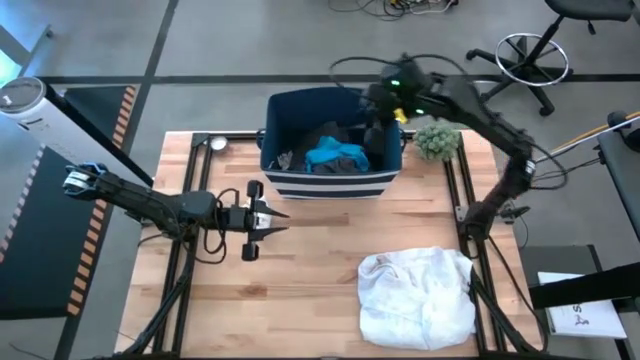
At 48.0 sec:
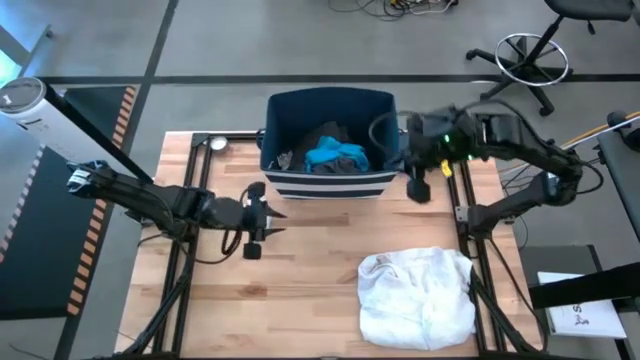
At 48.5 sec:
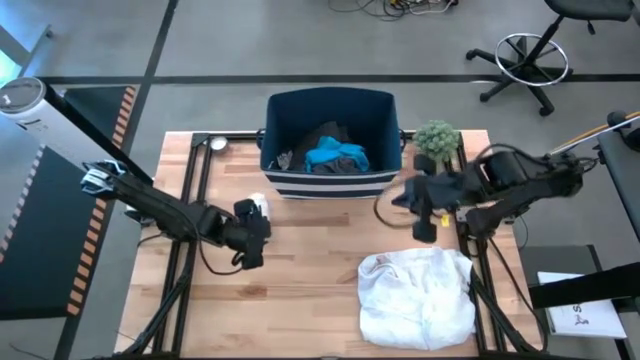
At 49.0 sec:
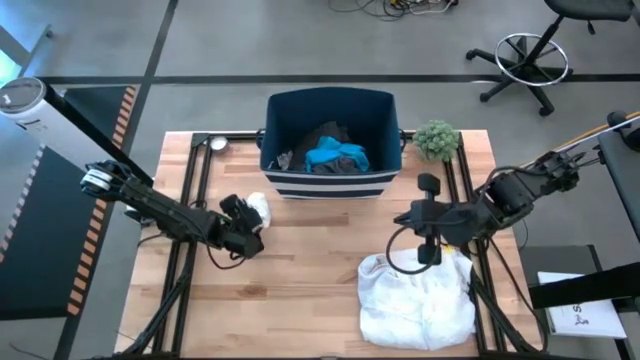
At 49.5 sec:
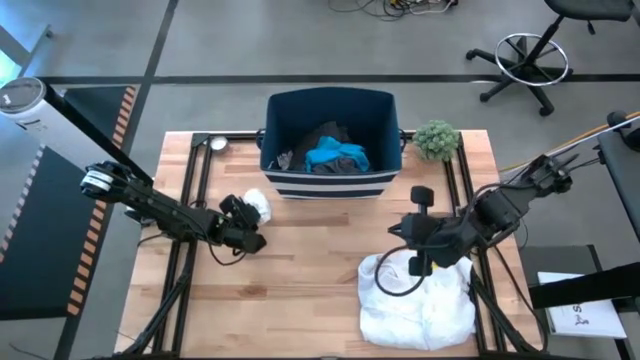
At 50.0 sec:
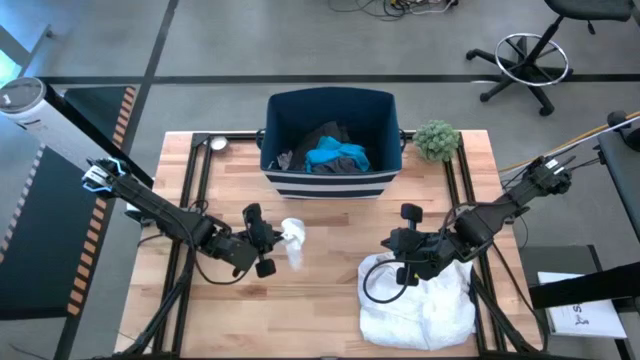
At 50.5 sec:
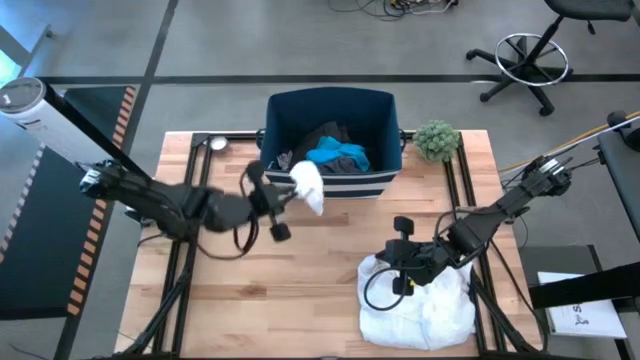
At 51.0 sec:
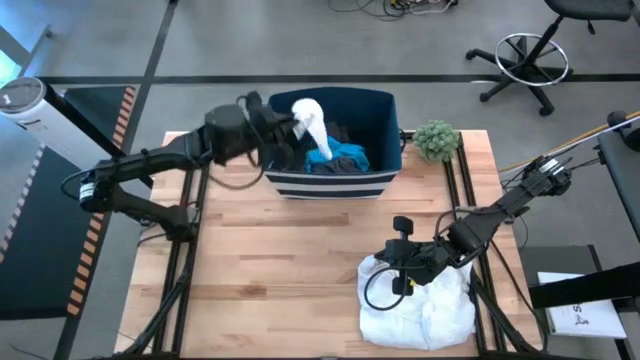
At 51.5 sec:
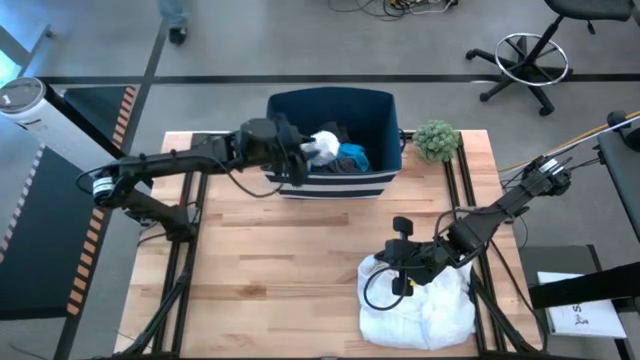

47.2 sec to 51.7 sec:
Task: Sort clothes
Put the white socks into the laundry organizer

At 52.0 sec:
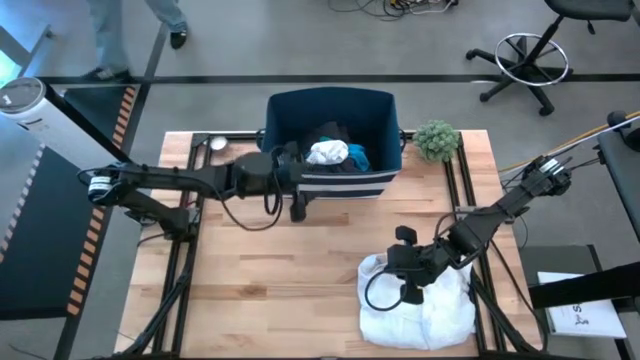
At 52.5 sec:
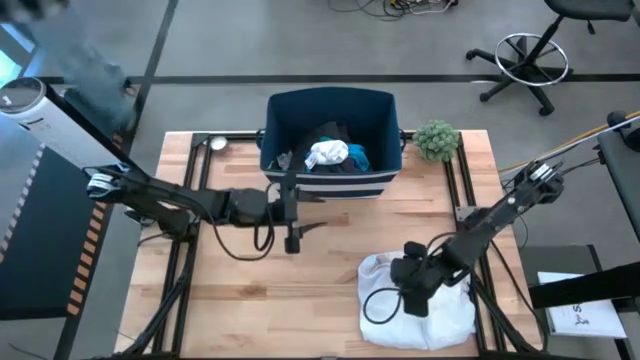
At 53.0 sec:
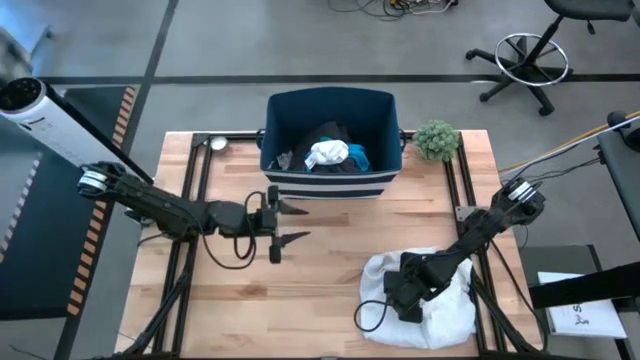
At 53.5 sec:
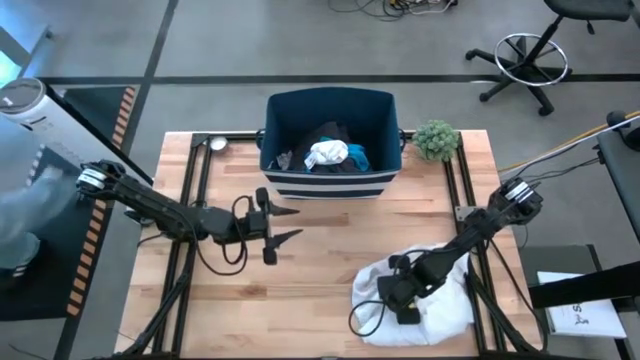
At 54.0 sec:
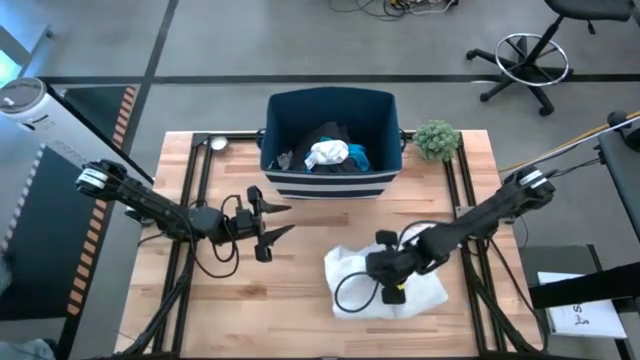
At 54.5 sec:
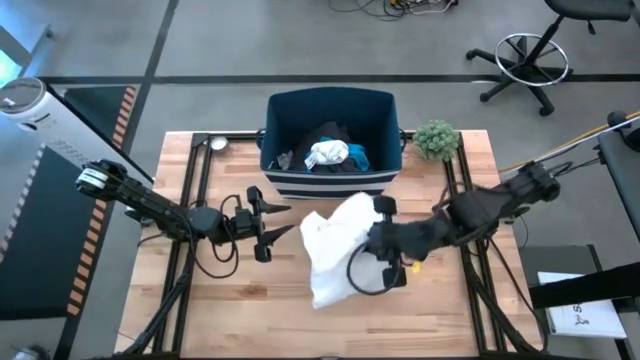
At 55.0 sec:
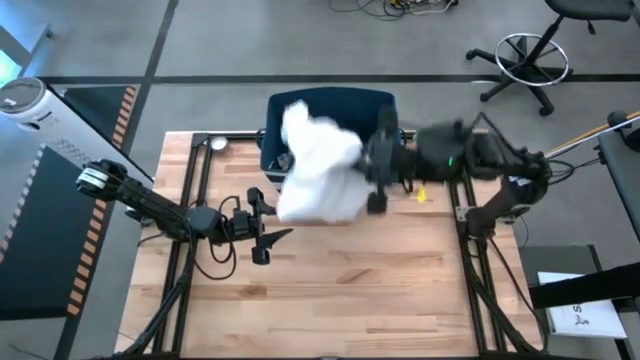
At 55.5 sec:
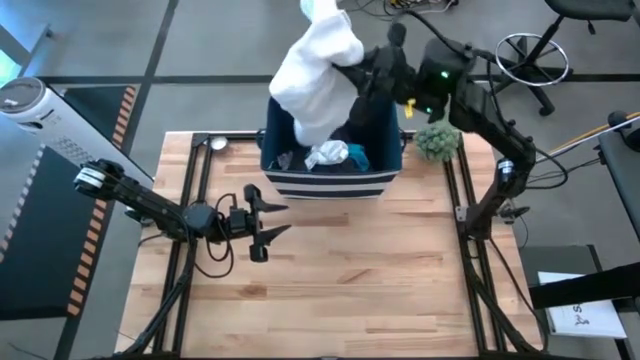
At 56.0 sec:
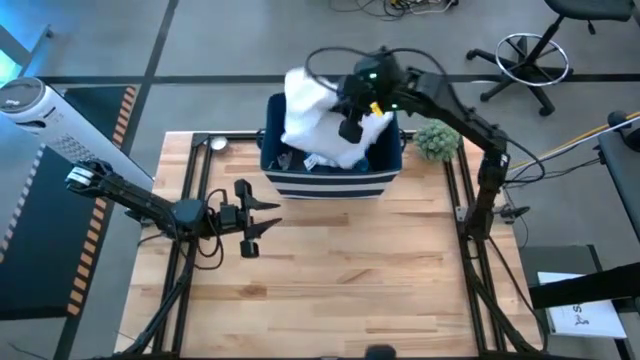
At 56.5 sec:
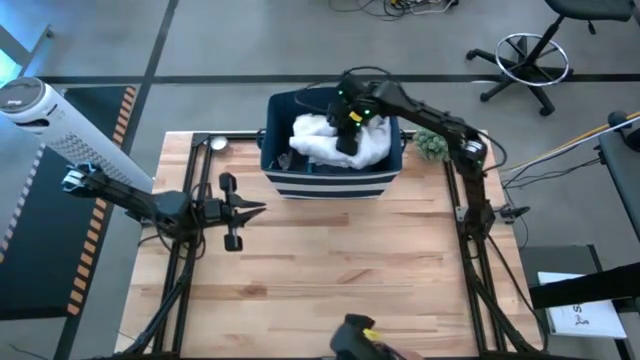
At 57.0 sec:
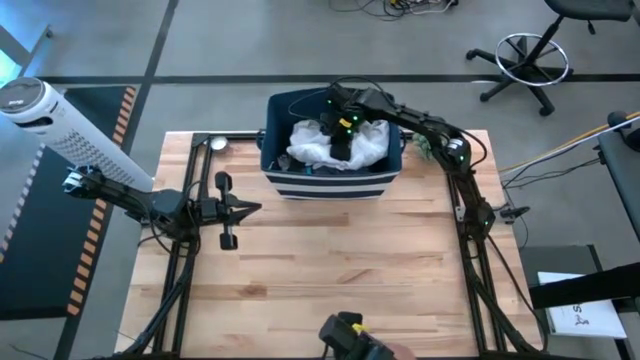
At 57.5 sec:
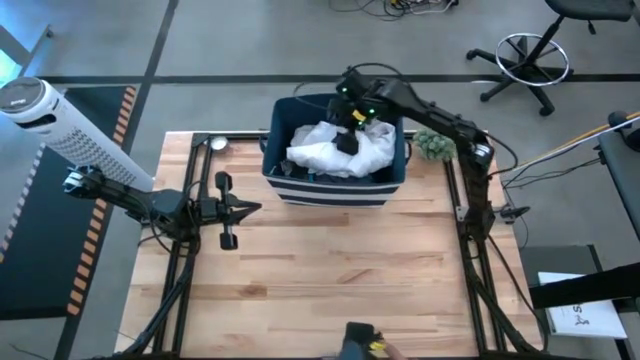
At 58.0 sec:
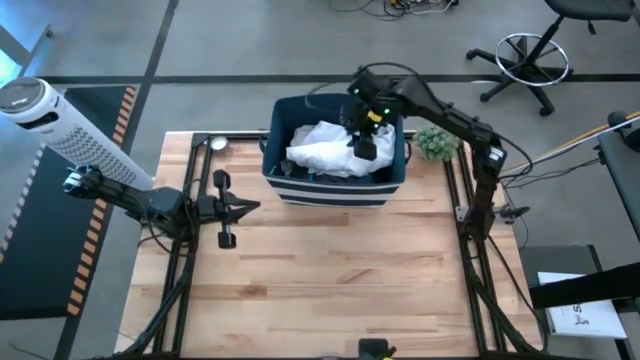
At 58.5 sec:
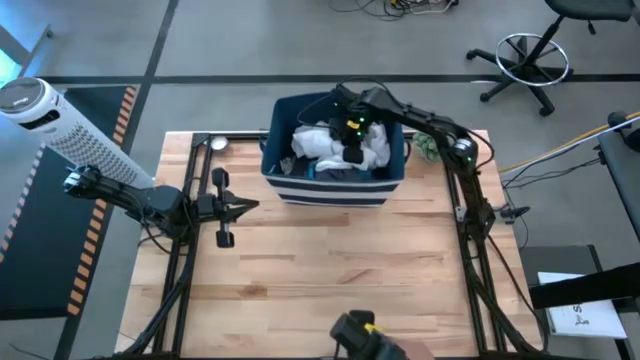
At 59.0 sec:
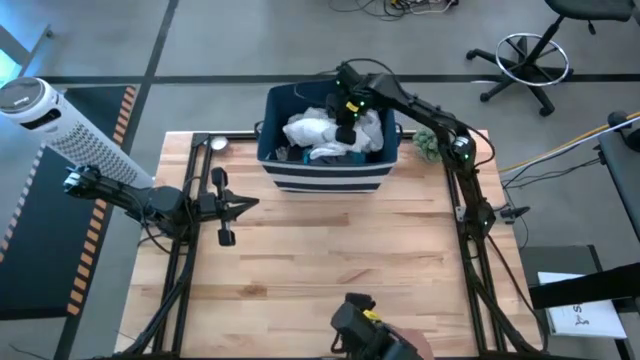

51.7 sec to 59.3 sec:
Put the white polo shirt into the laundry organizer

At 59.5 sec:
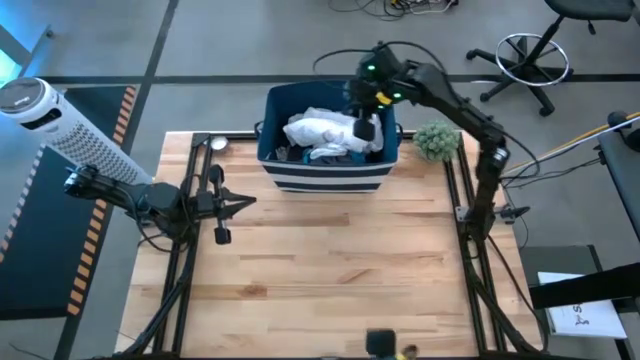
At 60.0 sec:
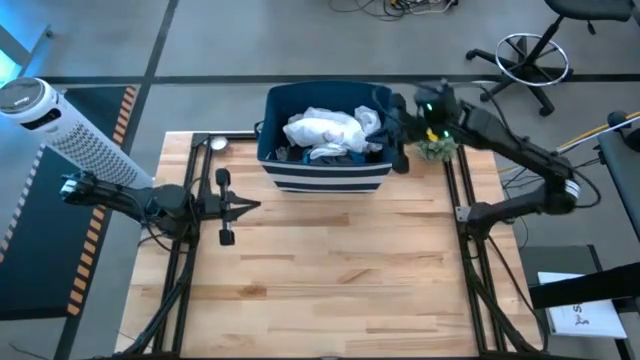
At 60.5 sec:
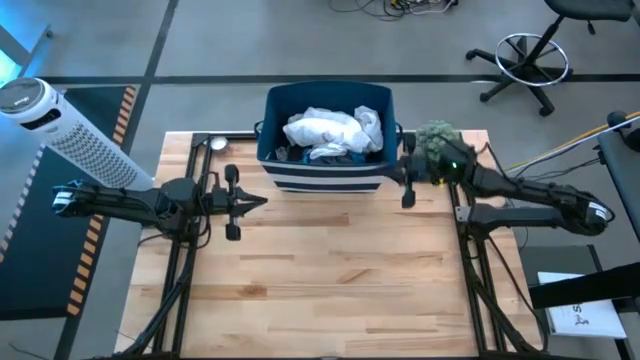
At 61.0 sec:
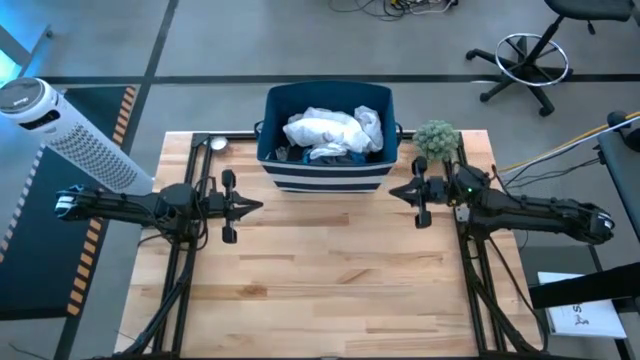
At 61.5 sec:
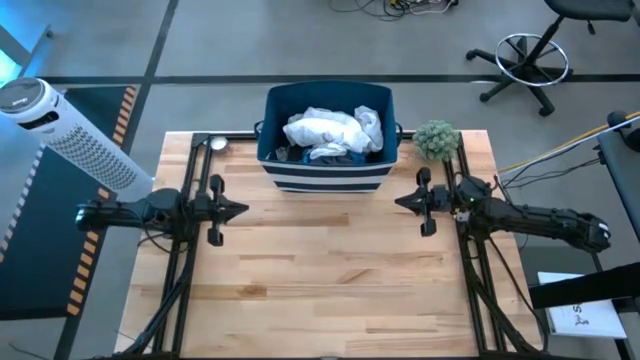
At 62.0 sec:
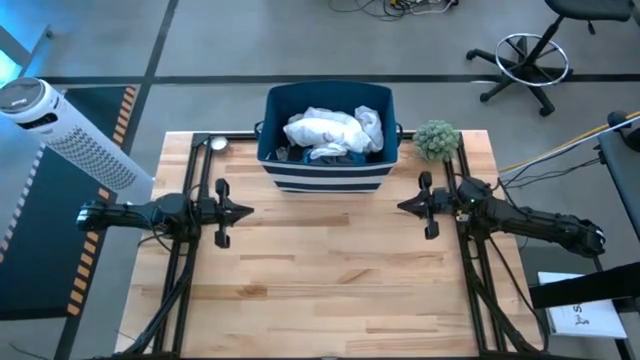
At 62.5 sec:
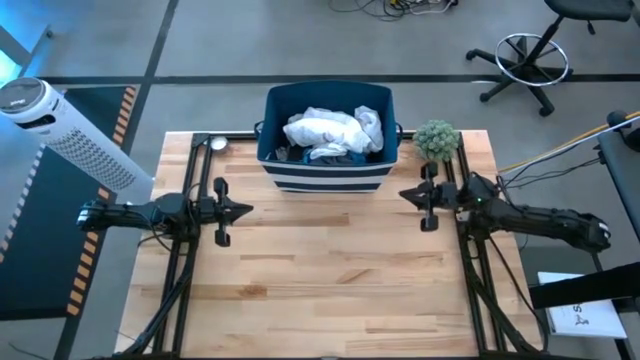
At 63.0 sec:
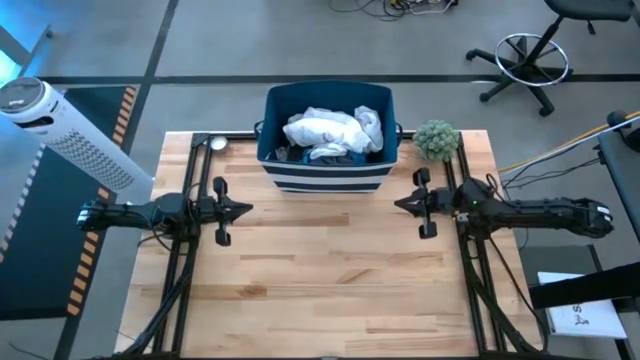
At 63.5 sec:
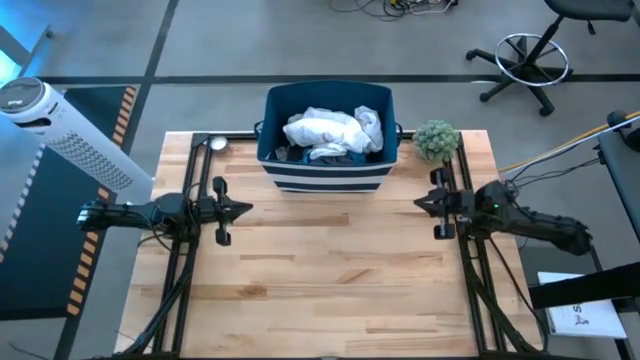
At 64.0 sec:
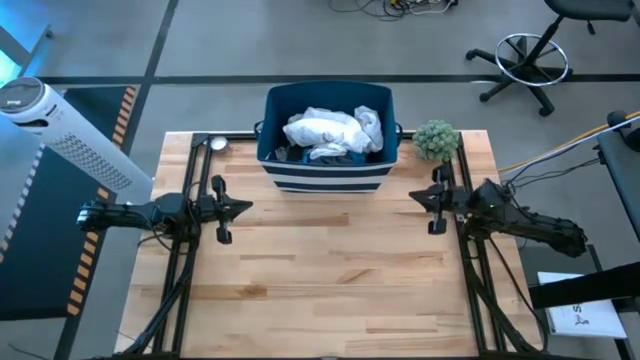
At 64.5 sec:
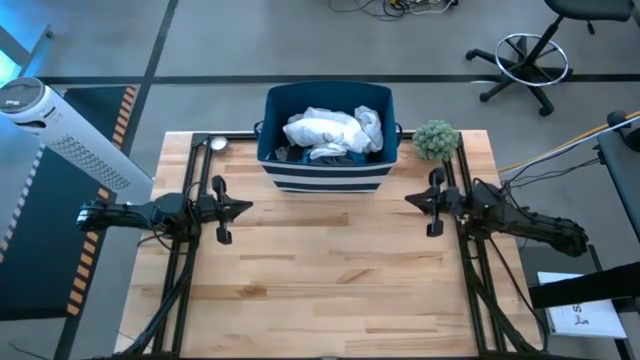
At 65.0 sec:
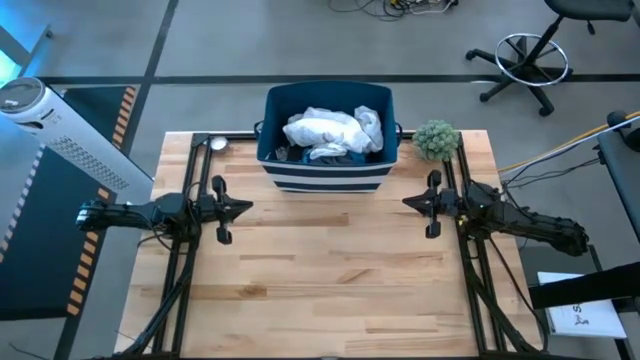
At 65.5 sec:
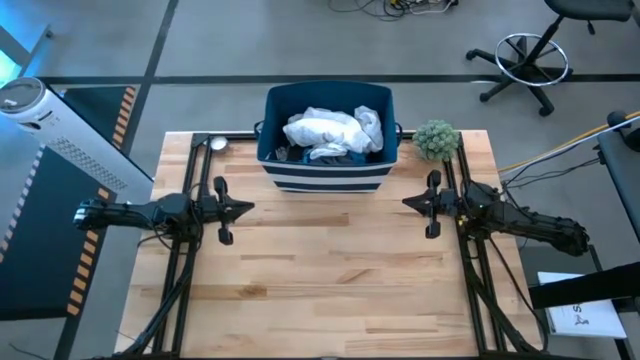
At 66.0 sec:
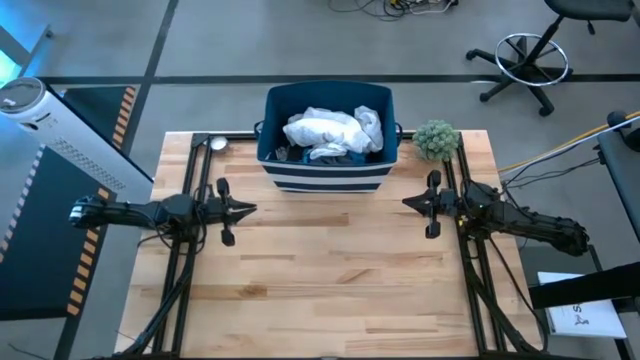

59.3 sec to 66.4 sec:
Return to Home Position
